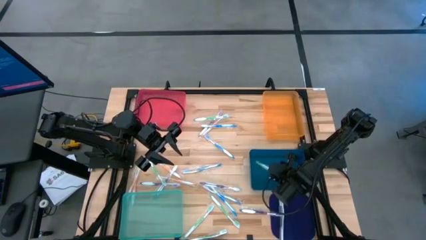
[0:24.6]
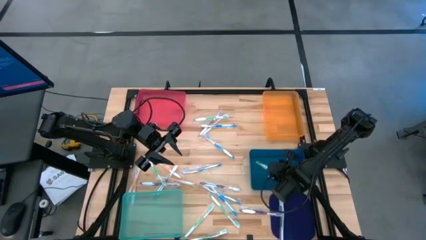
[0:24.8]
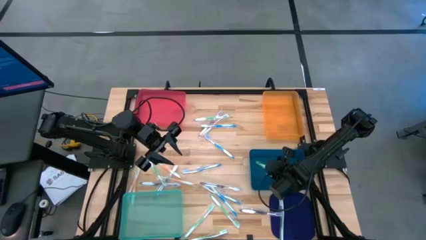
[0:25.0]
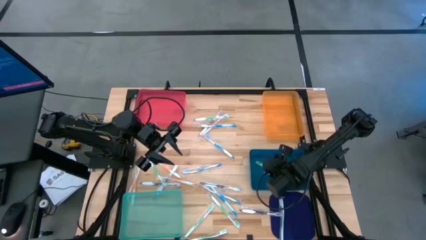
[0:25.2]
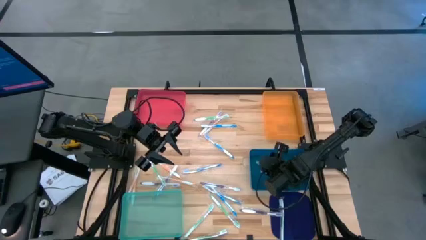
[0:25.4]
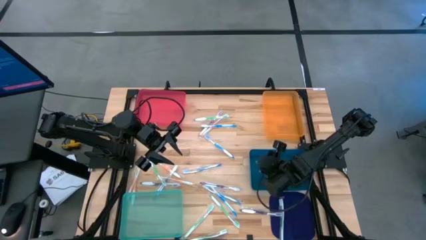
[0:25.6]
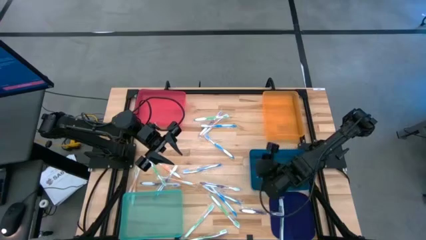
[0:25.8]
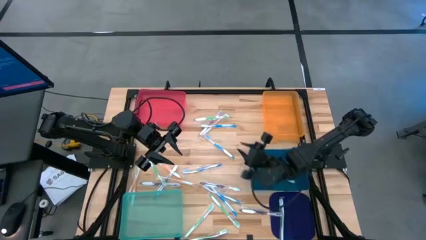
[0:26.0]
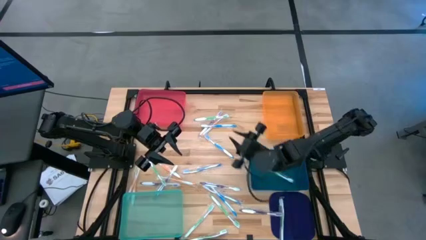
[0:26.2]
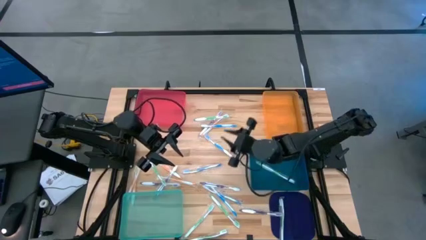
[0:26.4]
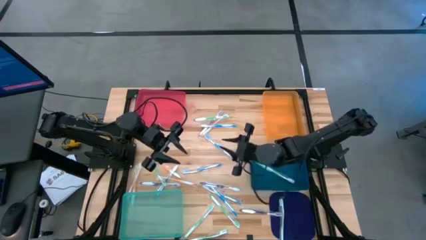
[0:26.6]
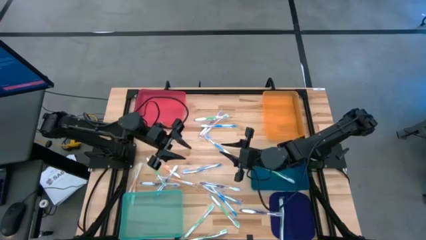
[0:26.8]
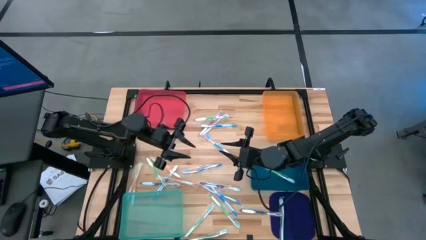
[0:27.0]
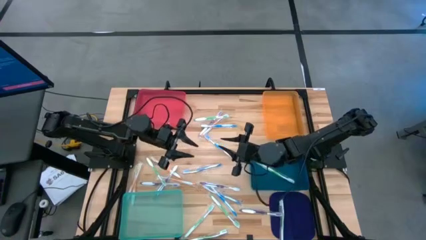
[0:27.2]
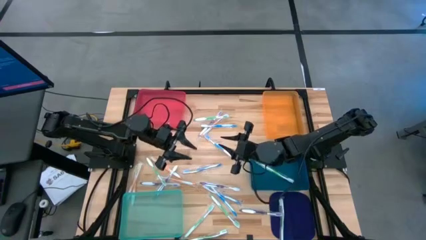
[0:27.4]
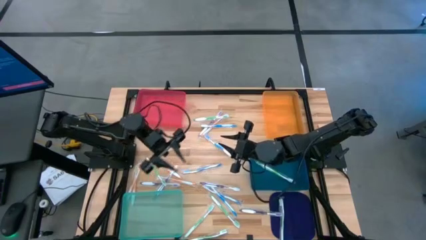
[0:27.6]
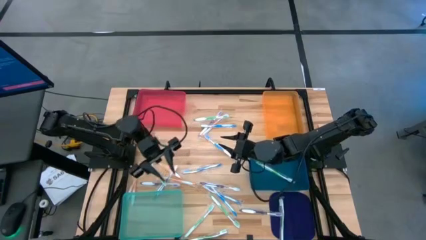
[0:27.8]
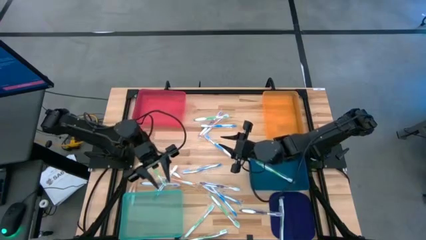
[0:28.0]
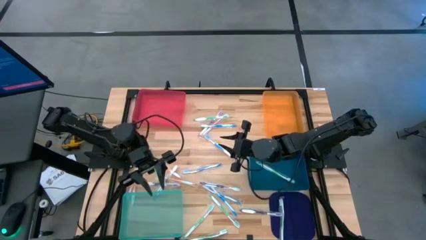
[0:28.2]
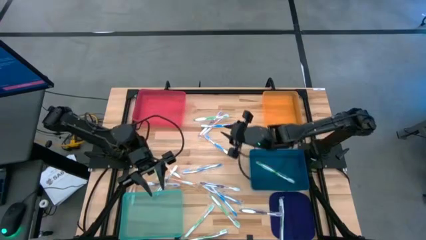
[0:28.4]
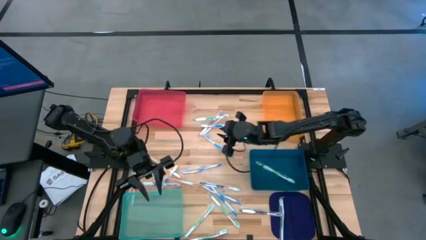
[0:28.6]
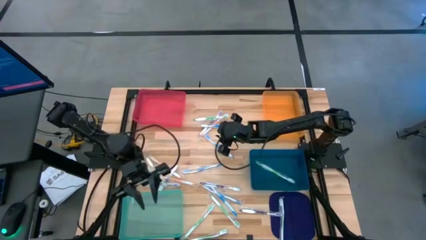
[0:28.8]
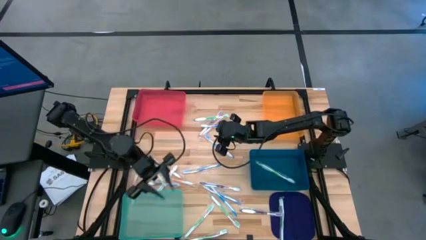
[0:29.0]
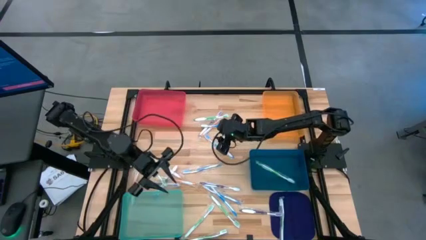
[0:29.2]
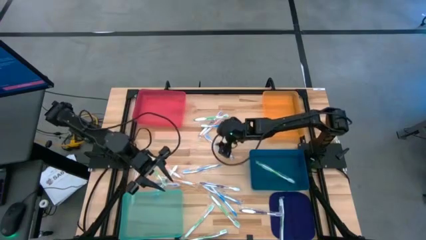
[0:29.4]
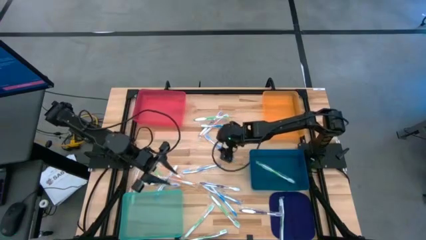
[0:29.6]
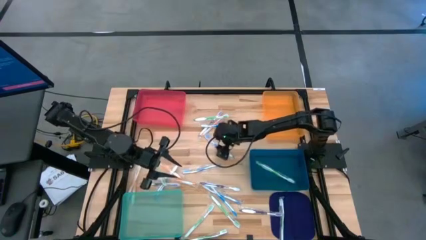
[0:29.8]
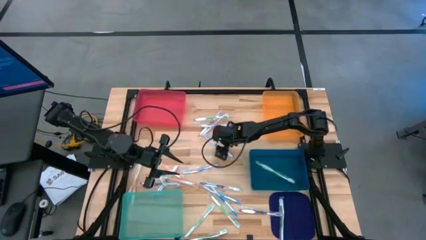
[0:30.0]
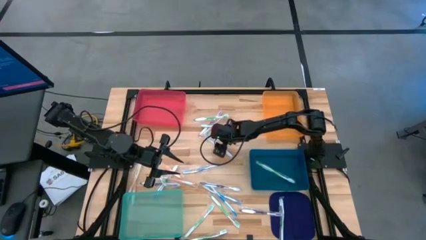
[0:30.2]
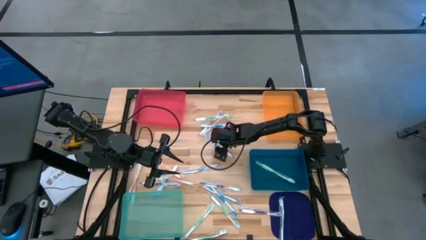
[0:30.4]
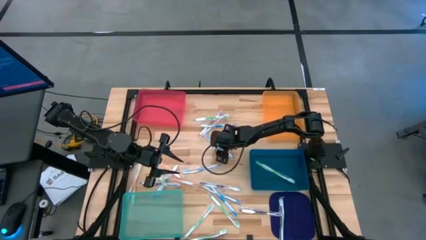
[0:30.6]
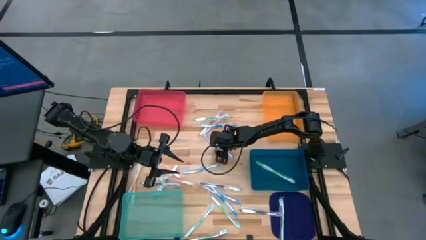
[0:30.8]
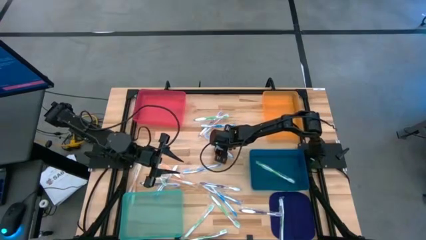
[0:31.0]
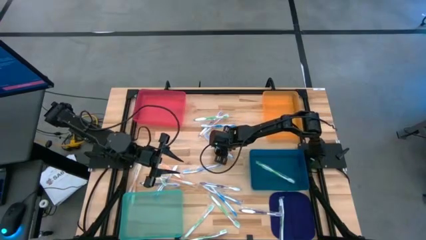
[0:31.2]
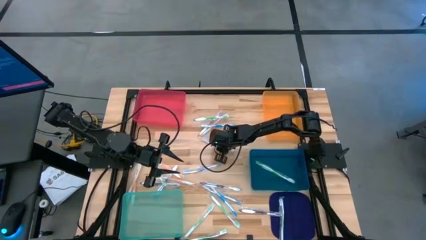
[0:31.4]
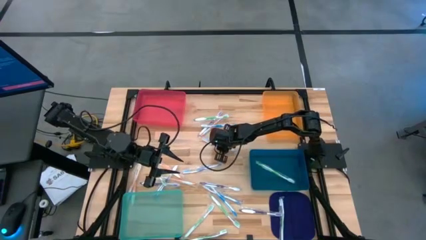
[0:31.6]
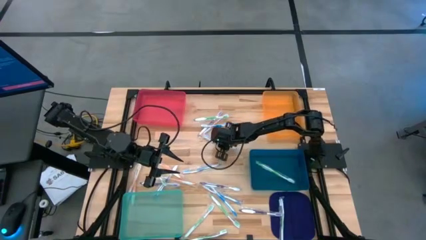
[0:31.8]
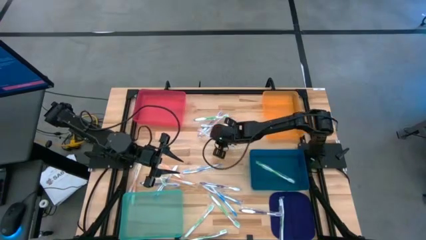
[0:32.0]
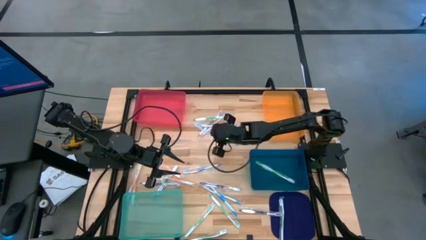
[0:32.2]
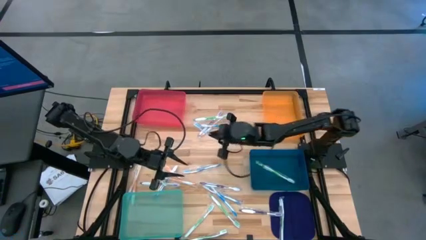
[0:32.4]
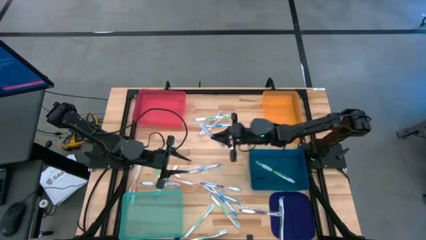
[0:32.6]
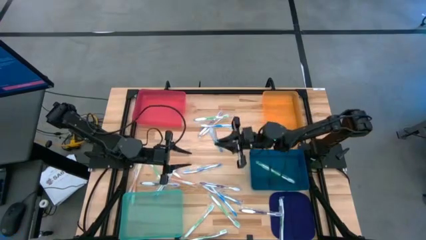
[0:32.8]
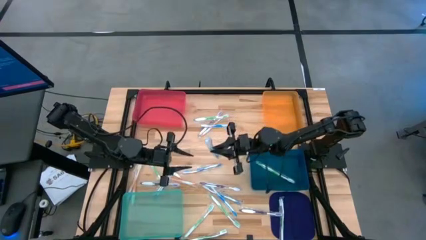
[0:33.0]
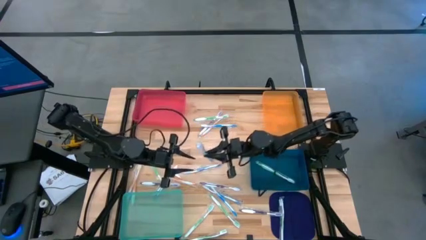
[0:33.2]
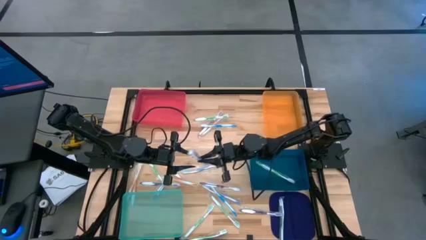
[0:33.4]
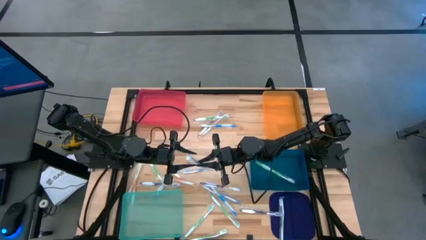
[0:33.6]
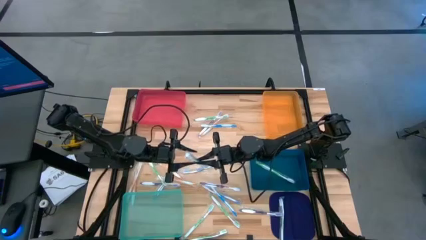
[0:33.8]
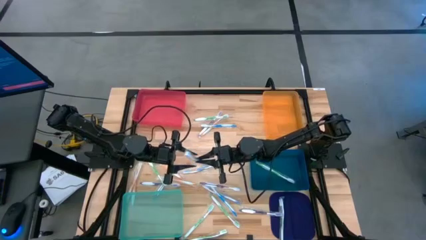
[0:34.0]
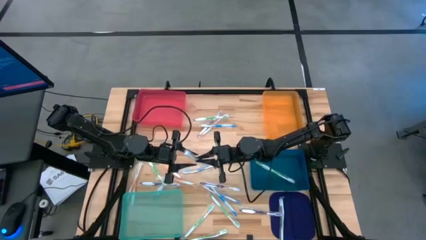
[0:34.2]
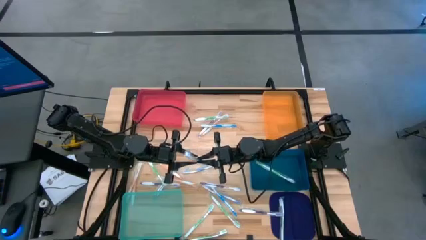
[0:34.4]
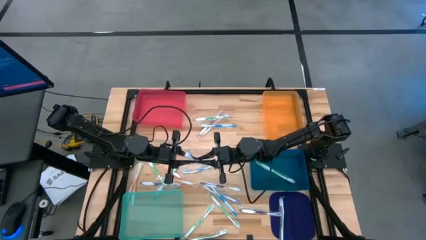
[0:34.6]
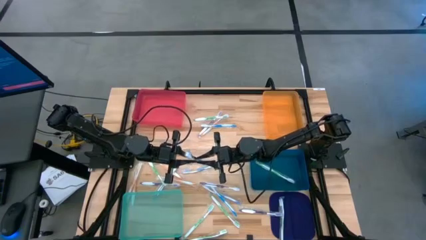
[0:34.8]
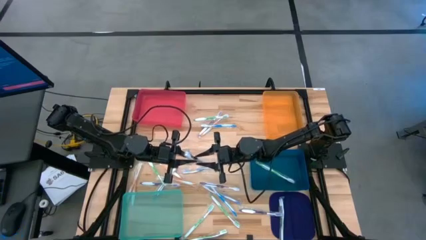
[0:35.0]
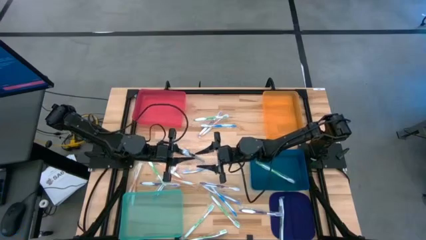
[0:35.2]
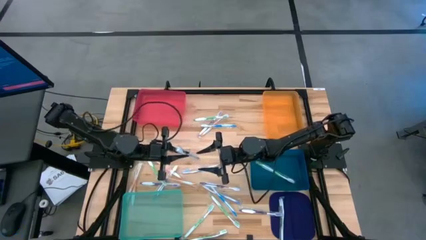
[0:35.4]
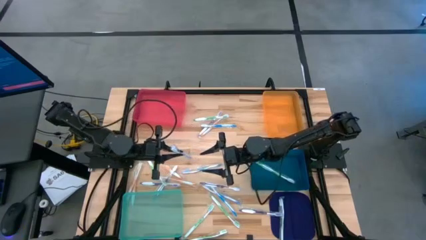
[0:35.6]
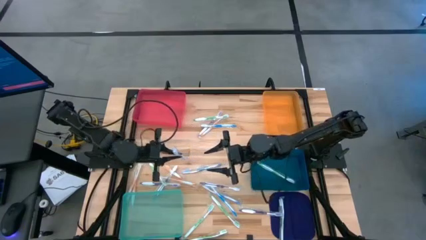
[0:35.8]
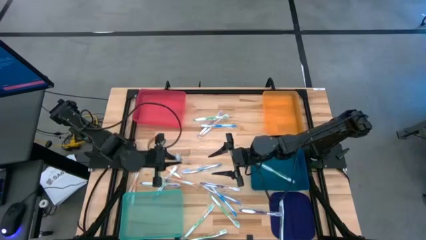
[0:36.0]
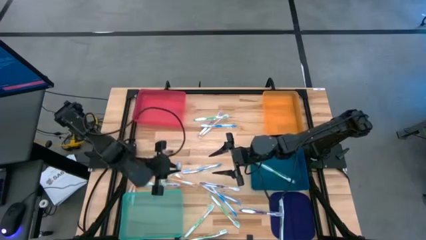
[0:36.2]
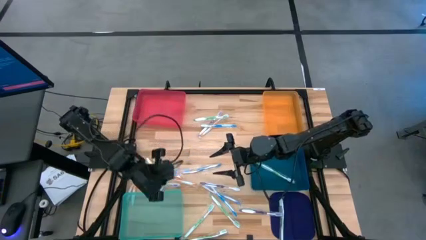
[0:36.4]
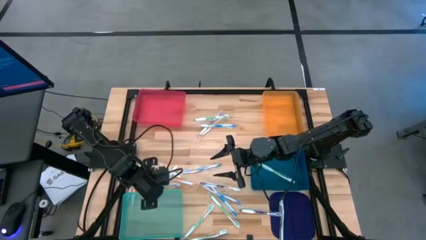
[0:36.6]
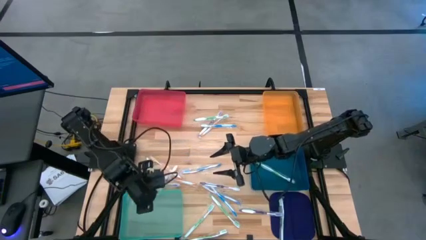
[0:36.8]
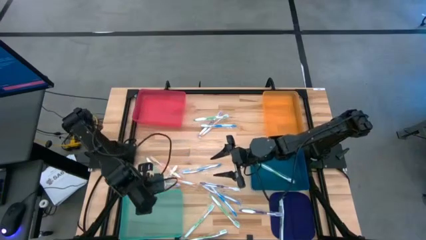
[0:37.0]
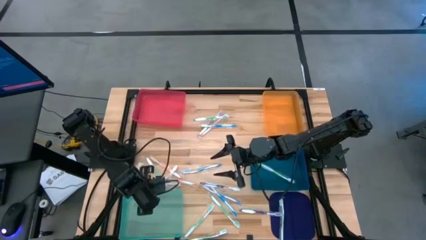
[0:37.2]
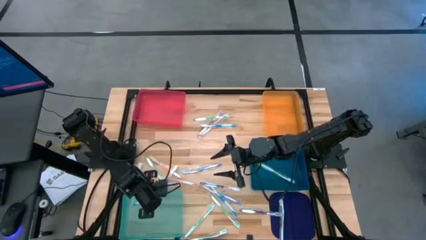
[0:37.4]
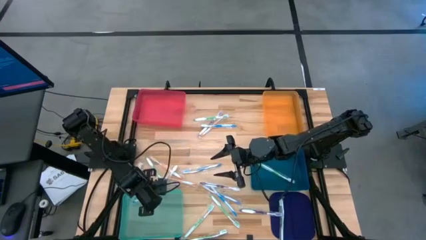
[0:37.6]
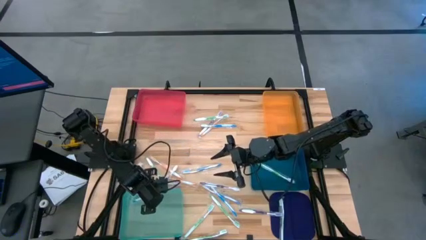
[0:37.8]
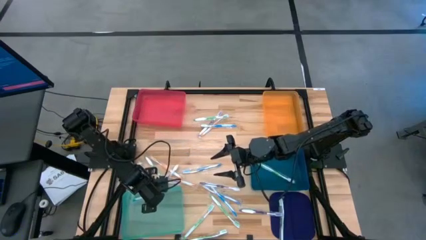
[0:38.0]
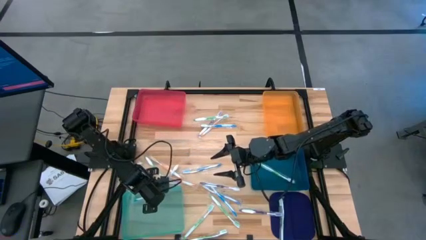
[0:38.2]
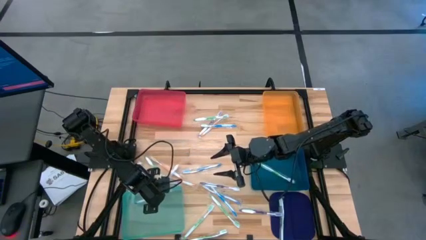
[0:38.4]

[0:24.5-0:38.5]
Task: Pick & Place Toothbrushes
Put the blue toothbrush into the green bin
